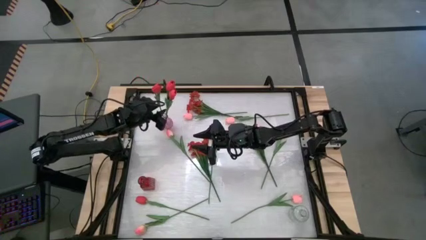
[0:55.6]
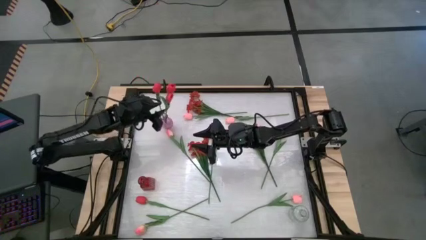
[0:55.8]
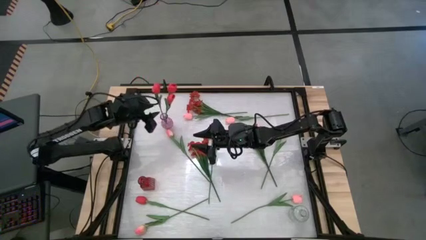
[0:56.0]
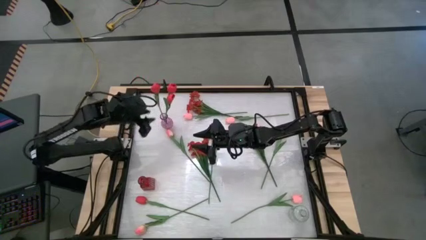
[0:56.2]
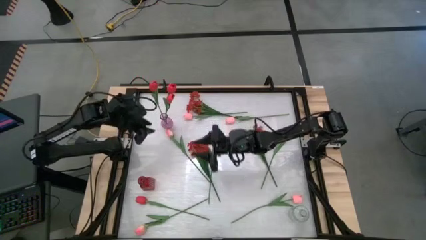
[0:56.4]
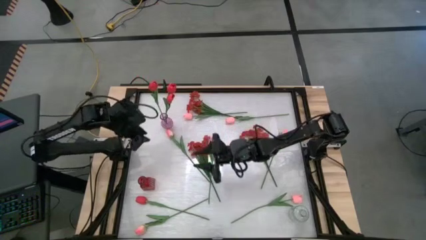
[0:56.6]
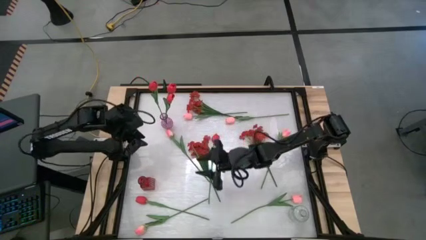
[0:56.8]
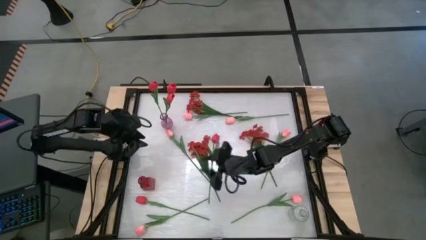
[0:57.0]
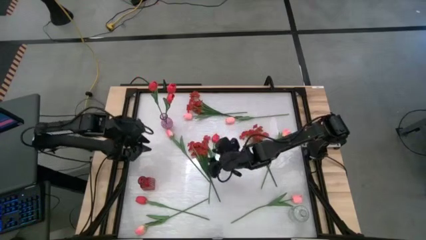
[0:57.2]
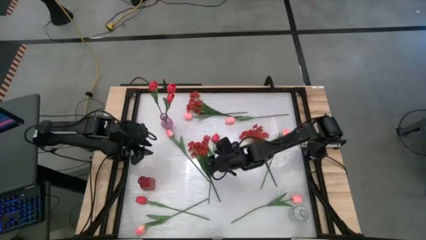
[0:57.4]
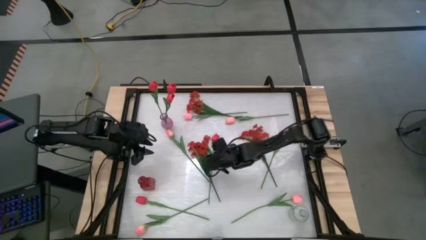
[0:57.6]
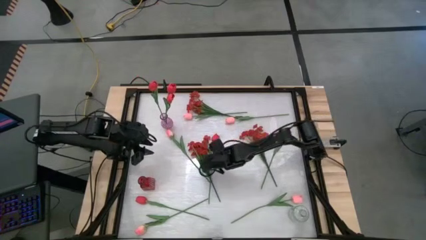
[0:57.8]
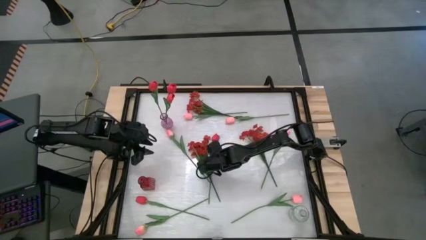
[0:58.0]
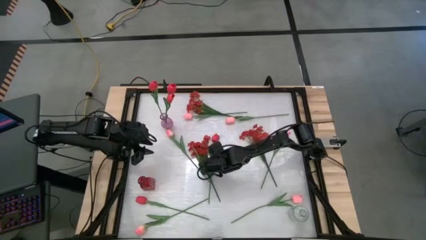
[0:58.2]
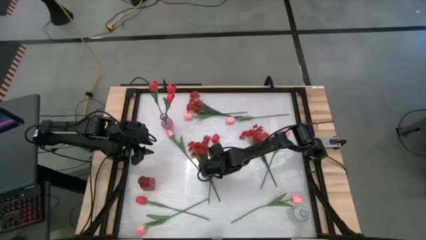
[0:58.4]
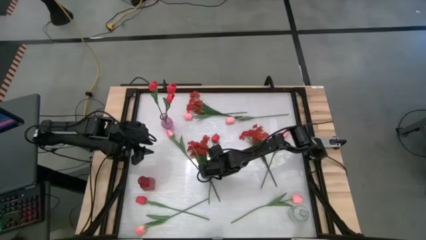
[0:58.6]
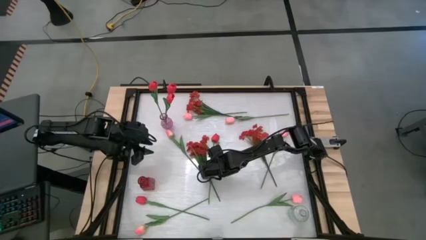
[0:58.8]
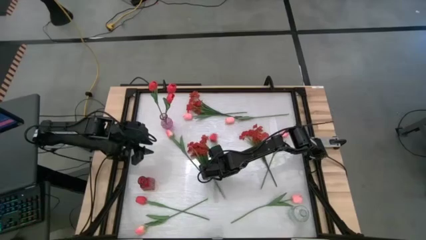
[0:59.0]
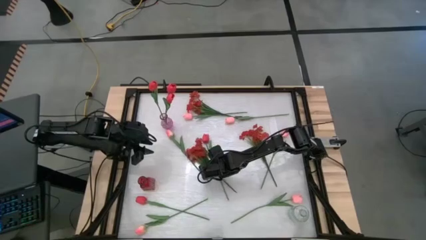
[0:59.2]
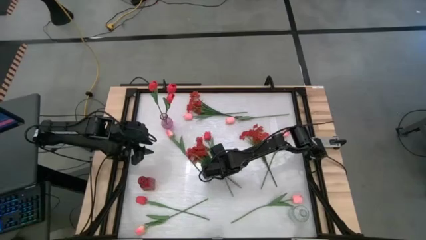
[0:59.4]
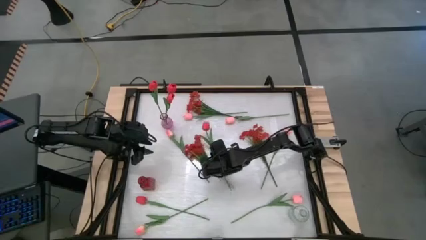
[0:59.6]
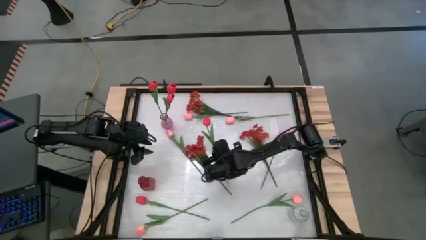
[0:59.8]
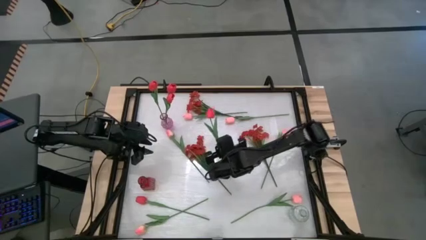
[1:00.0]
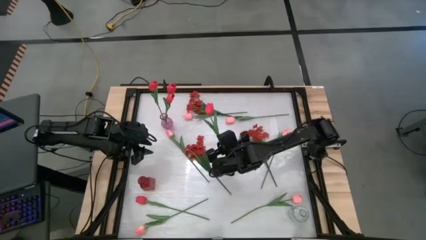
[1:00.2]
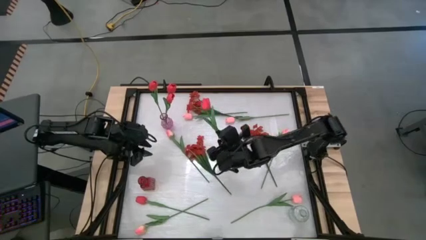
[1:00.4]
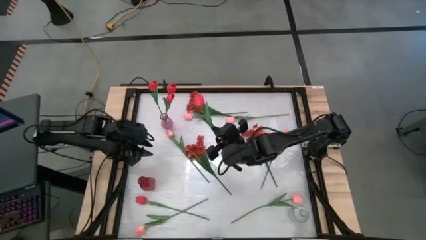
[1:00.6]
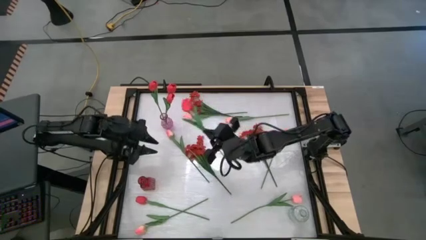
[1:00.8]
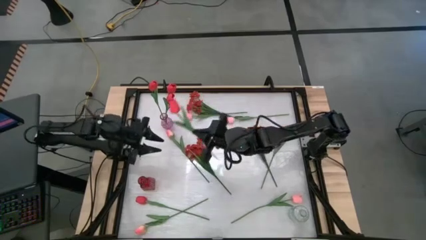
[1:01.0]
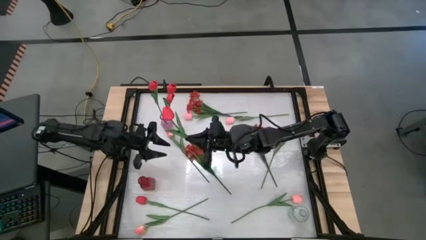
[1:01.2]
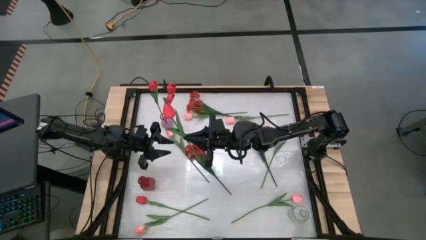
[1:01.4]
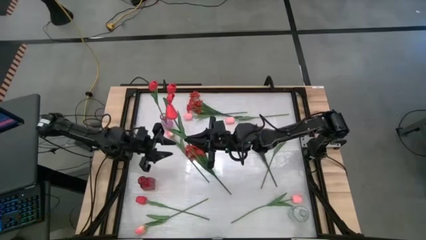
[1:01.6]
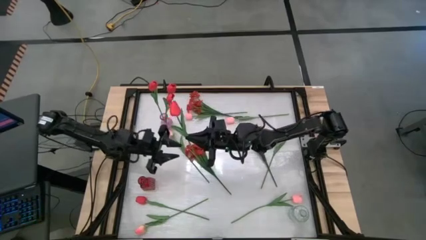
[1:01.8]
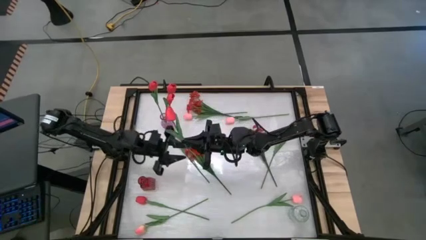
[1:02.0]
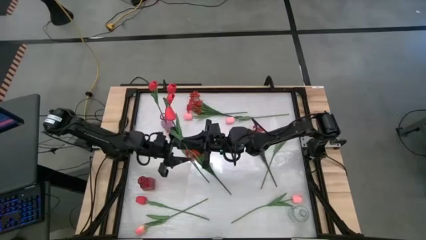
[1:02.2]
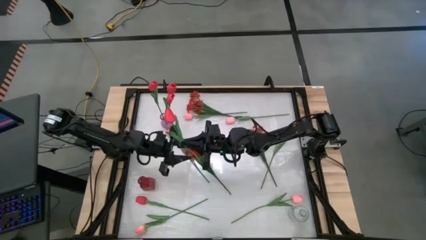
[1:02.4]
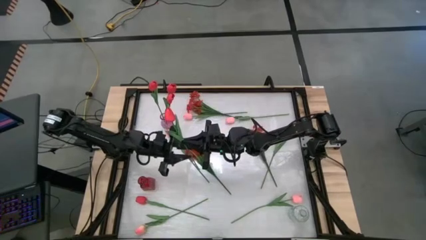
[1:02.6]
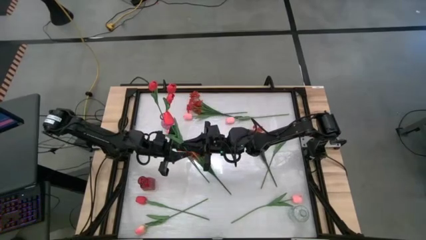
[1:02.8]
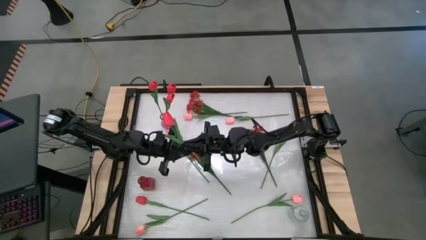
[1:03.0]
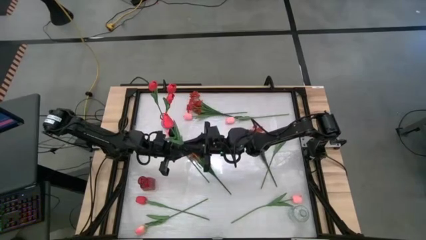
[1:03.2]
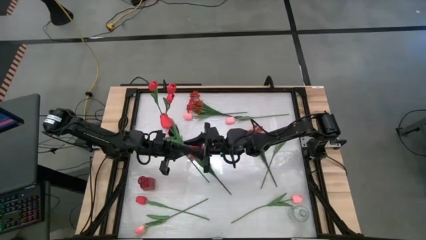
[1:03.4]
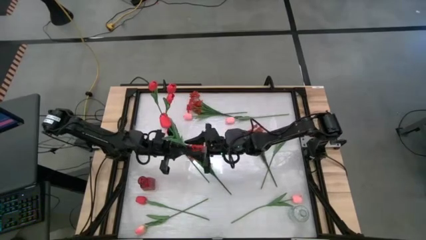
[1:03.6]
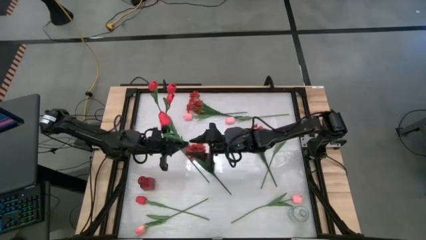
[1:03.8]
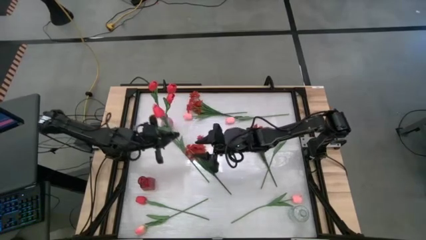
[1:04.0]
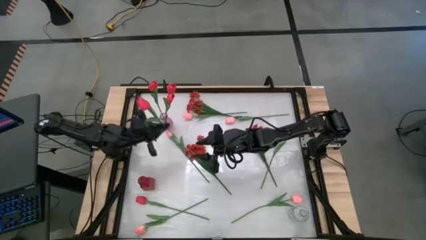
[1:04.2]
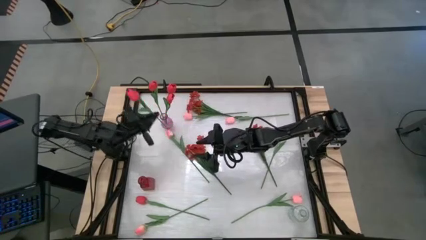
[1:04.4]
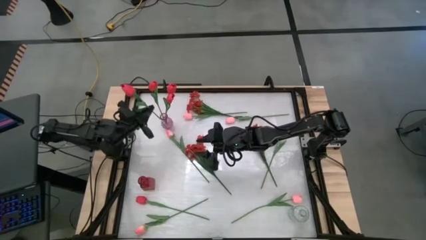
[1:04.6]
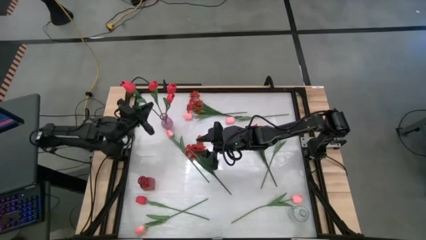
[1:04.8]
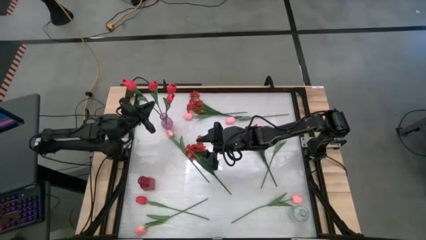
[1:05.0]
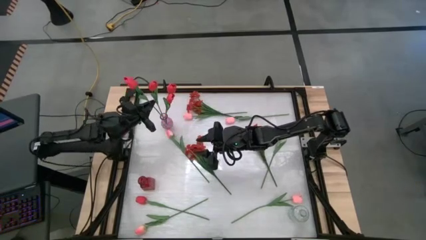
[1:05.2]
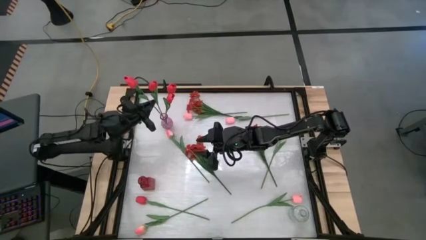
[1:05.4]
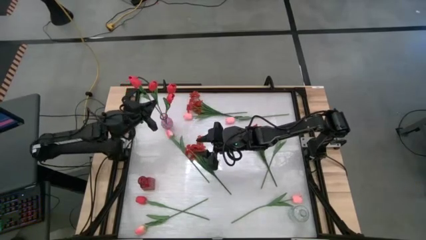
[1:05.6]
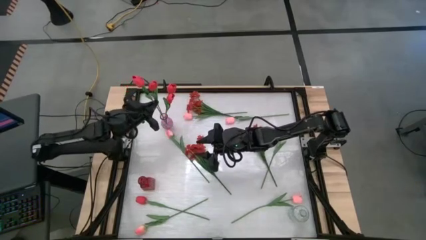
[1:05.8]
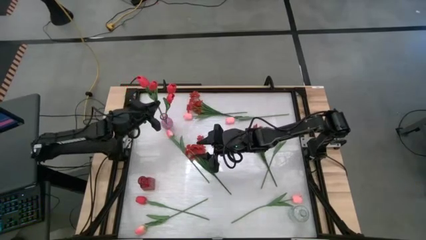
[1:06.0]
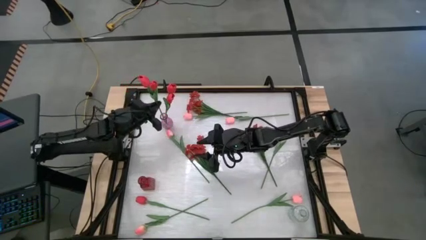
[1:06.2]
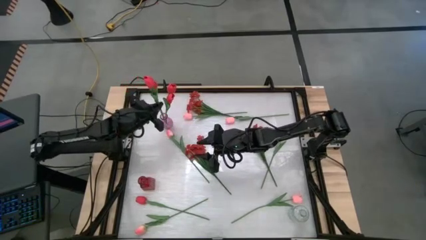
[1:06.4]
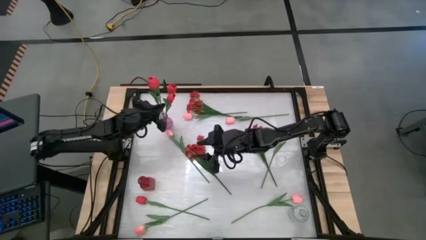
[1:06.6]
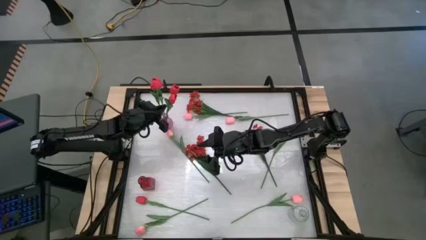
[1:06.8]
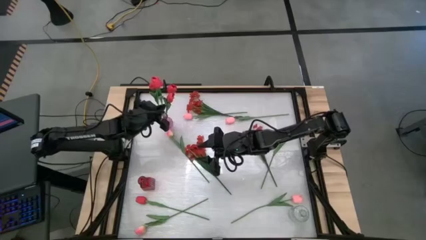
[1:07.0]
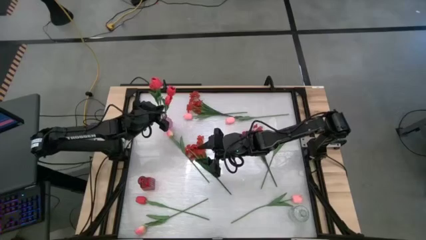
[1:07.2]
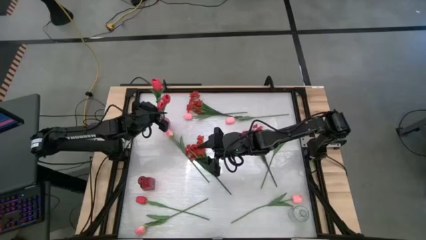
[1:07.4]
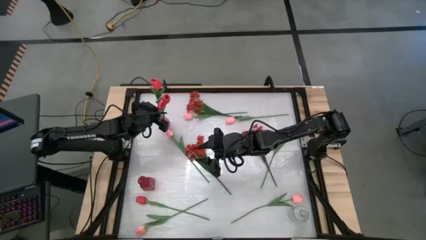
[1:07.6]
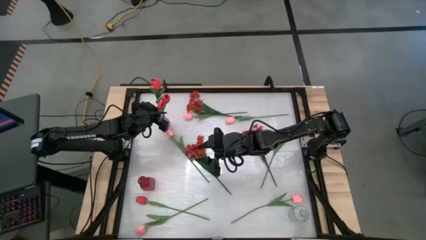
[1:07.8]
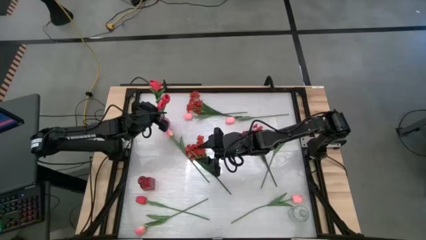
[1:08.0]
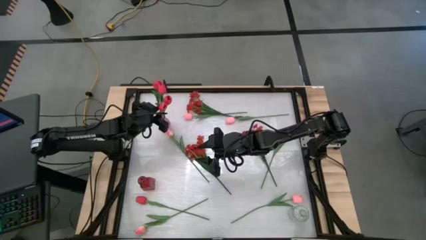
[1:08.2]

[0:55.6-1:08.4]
Task: Sort flowers into vase by color
Put the red tulip into the purple vase
